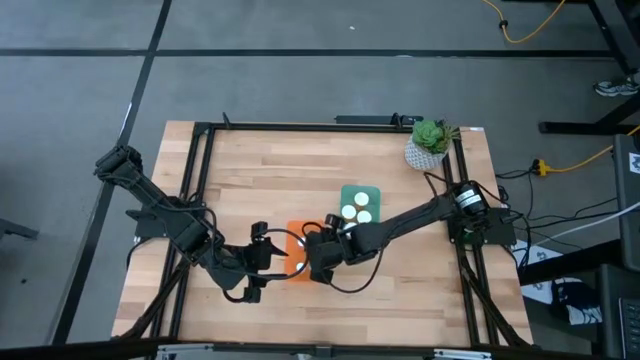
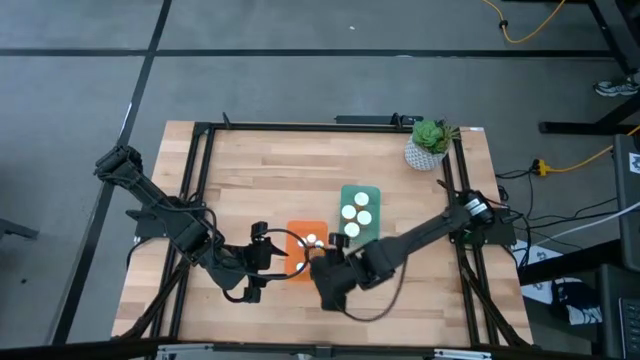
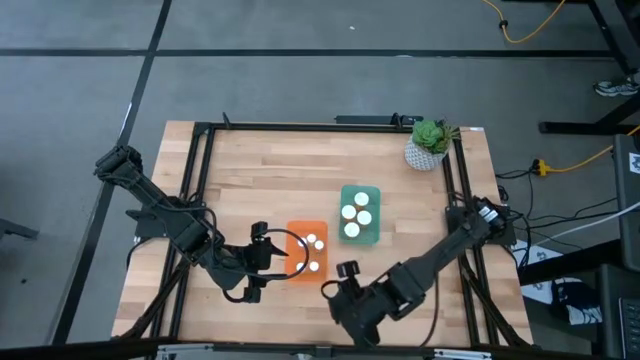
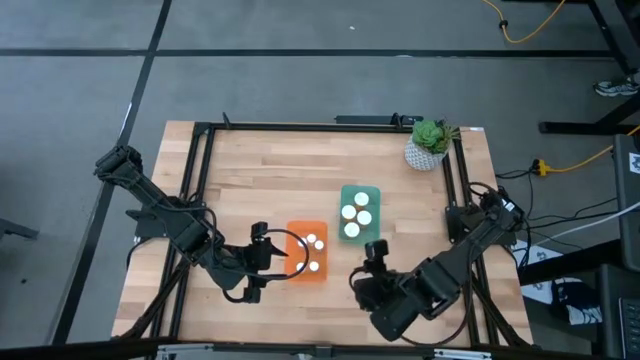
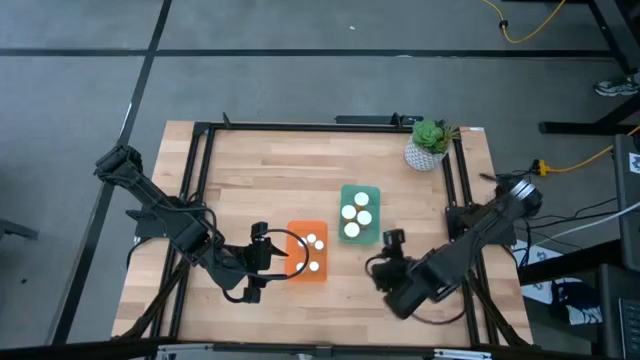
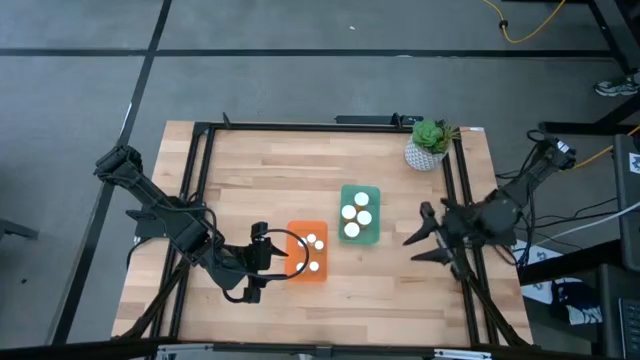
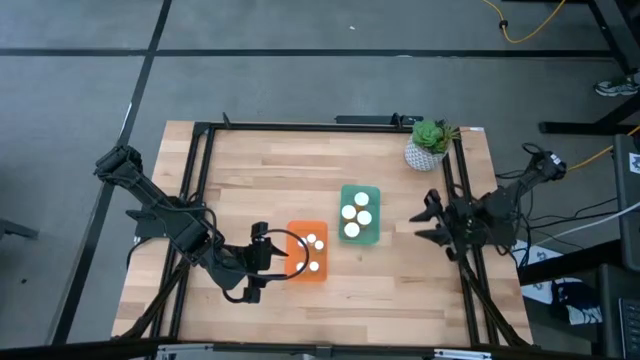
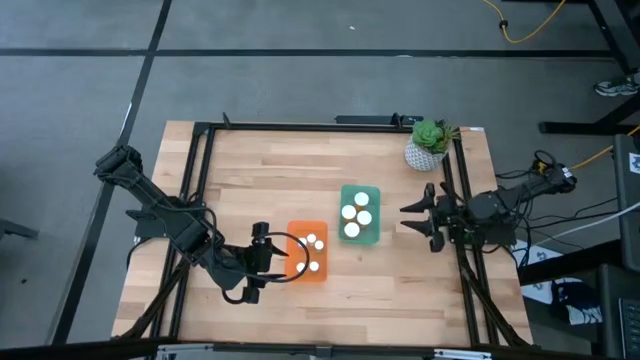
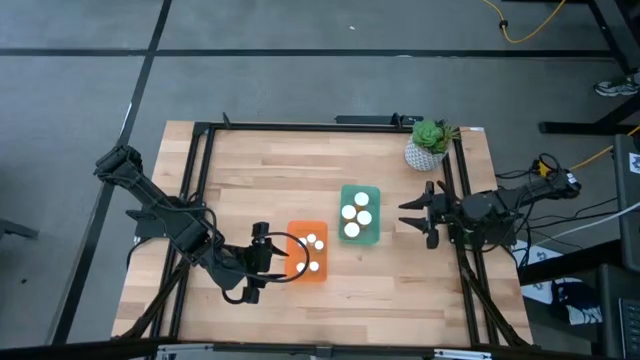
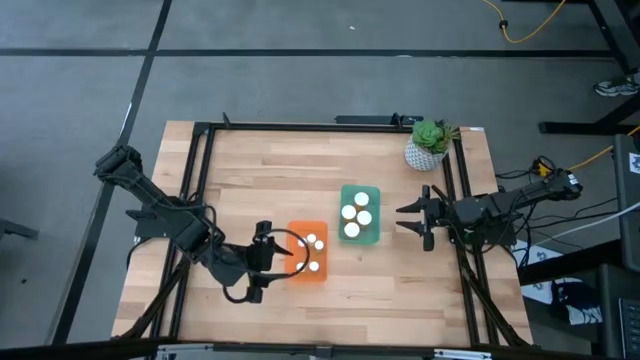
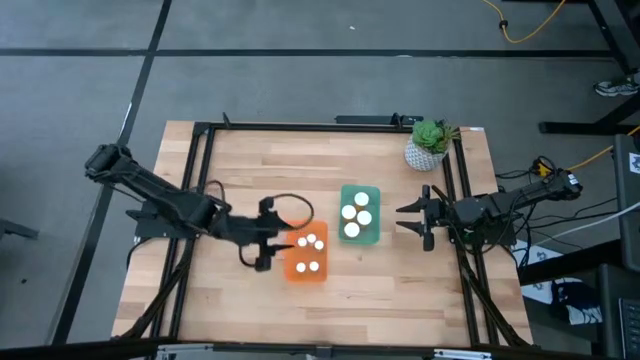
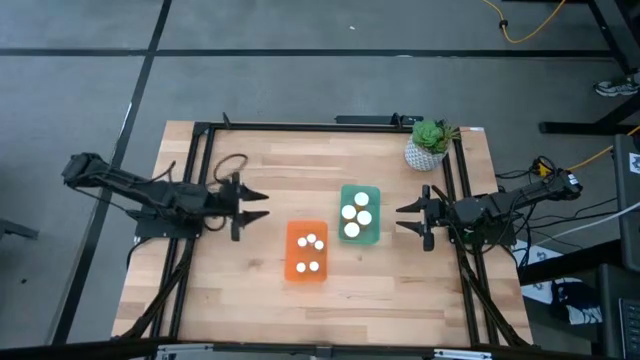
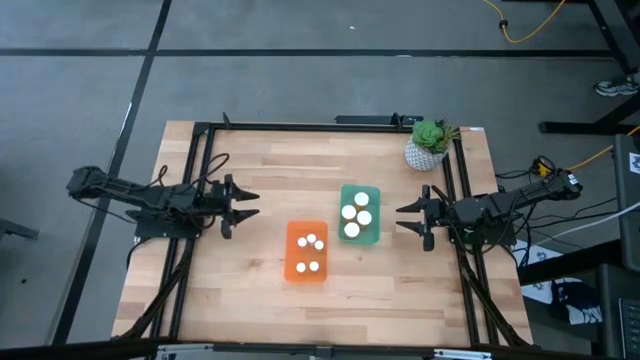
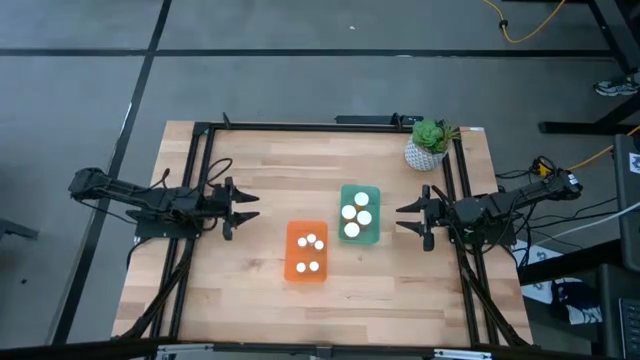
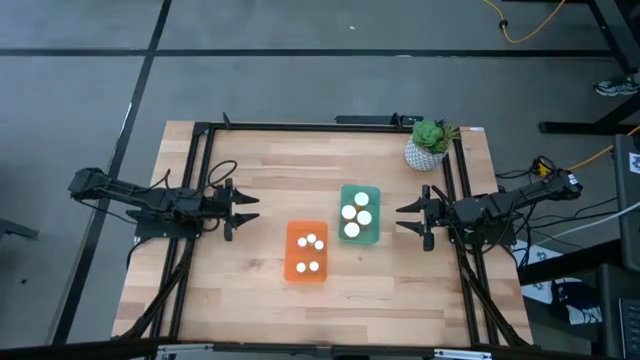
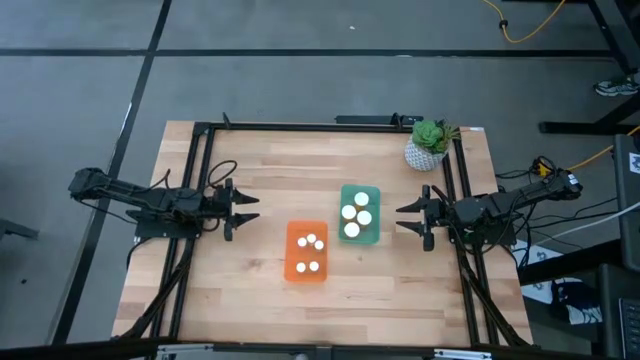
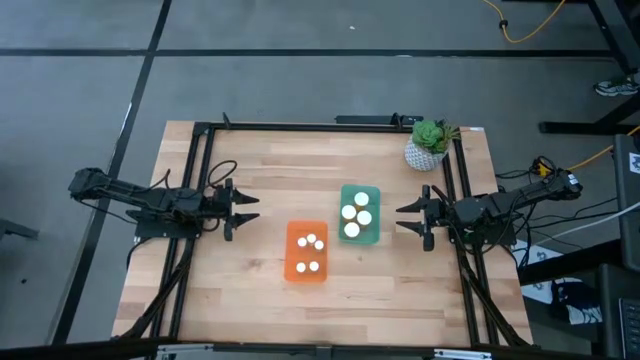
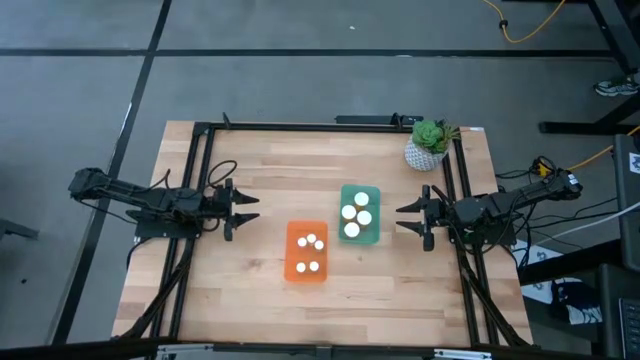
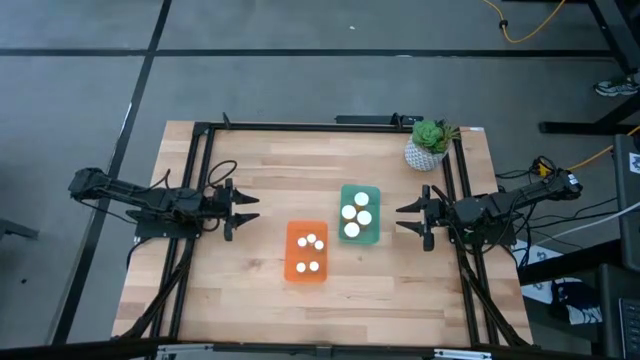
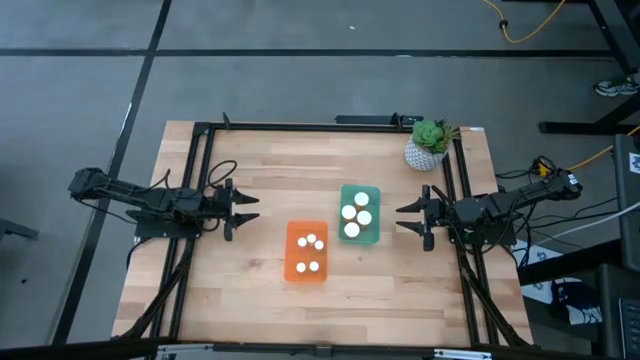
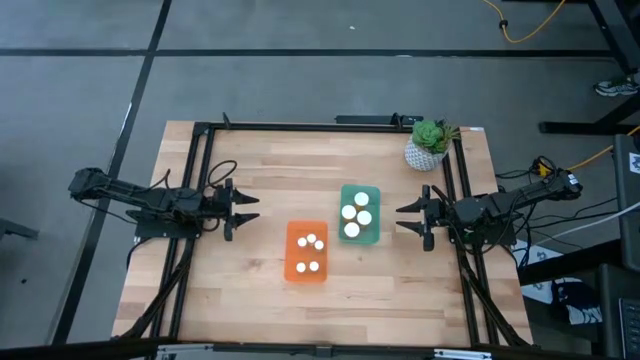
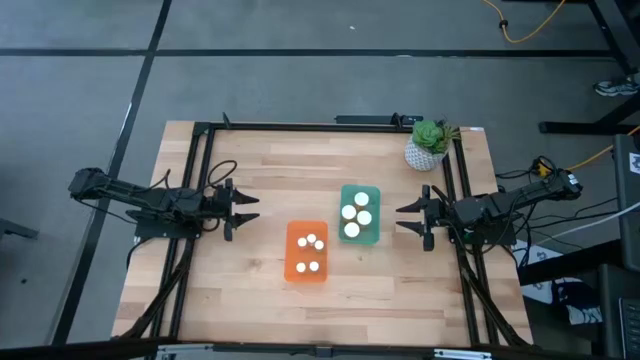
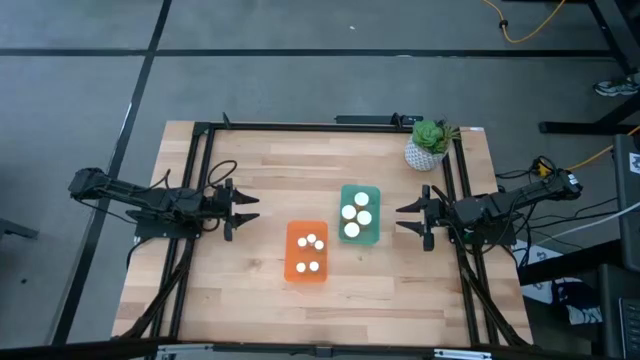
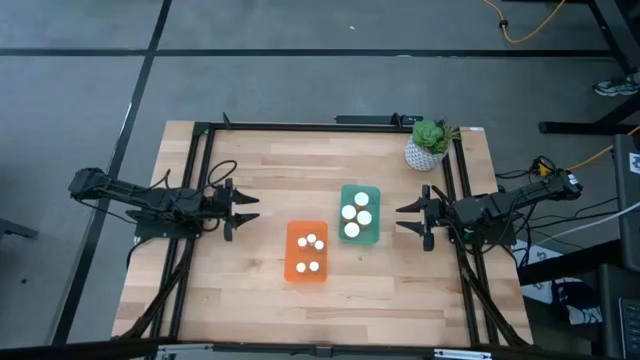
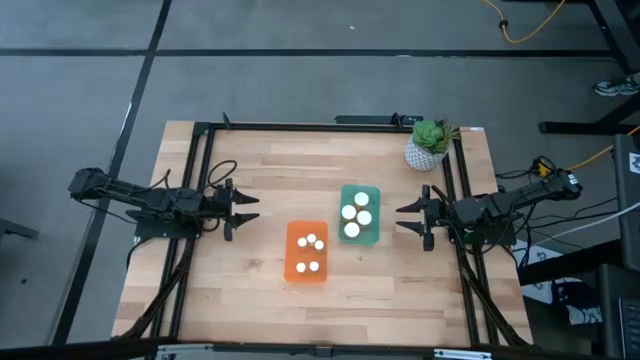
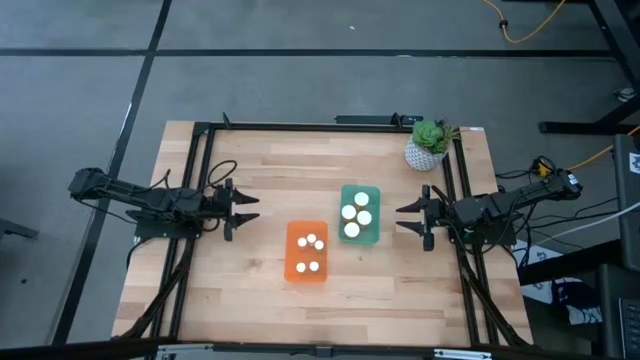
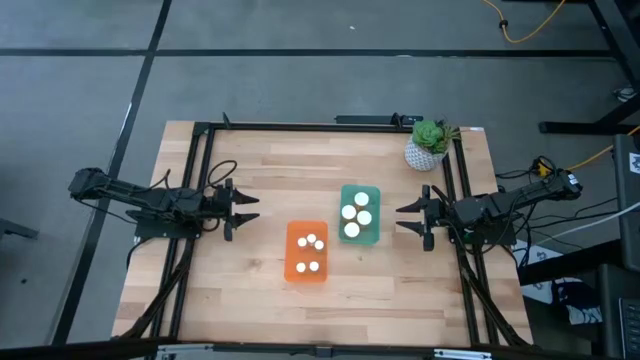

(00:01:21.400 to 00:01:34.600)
Task: Pick and place medicine bottles into bin by pill shape (circle, oval)
Return to Home Position

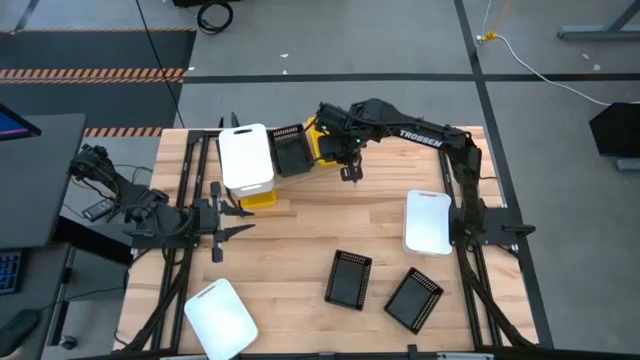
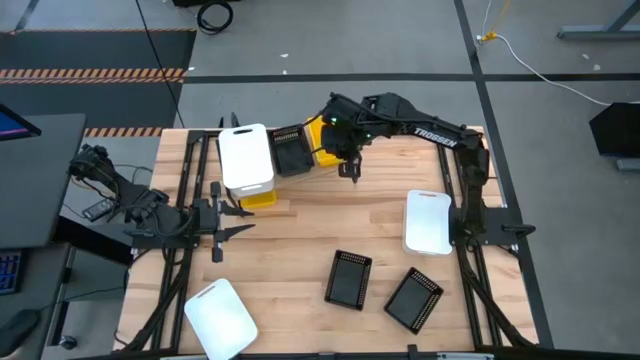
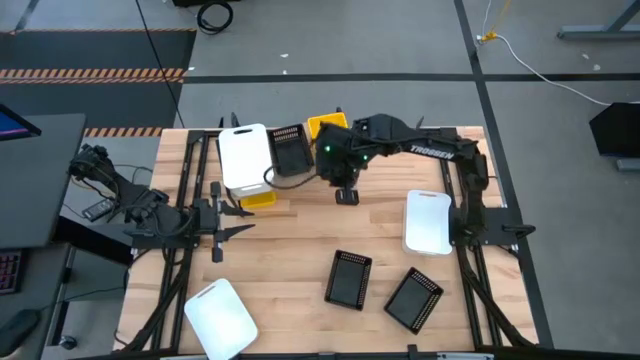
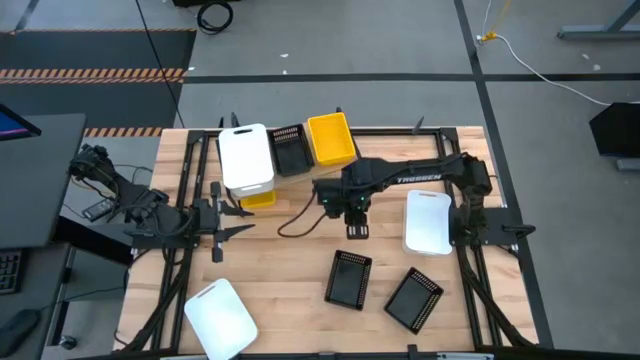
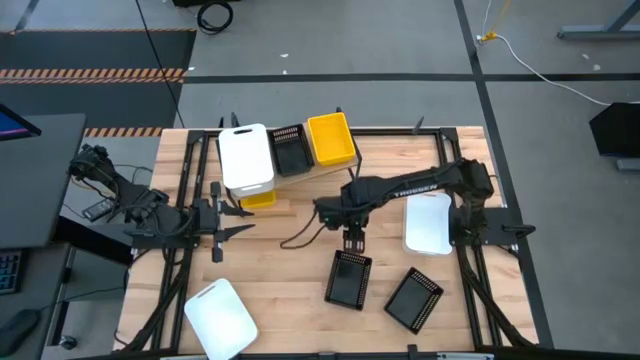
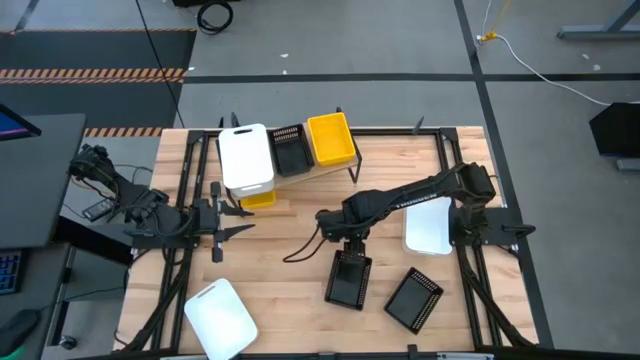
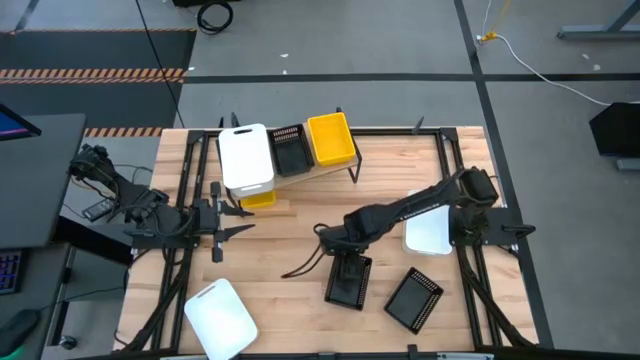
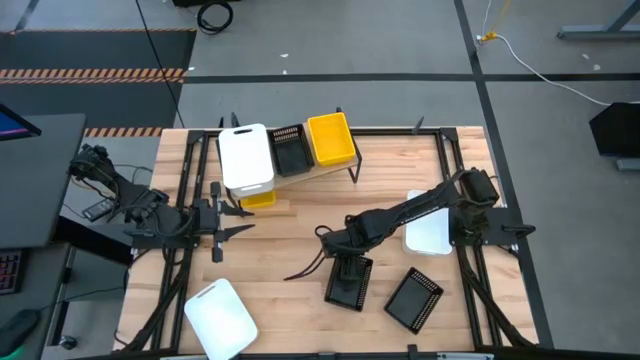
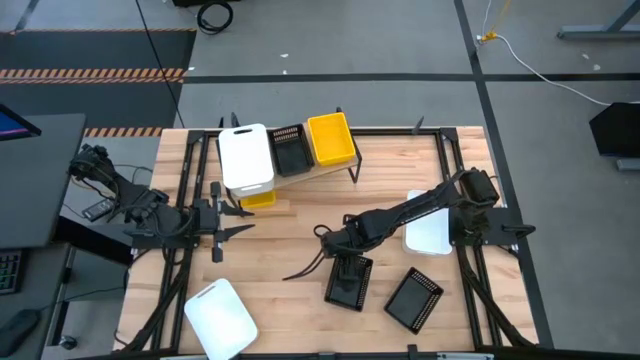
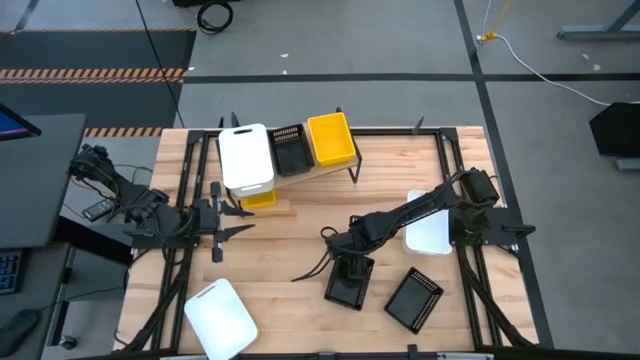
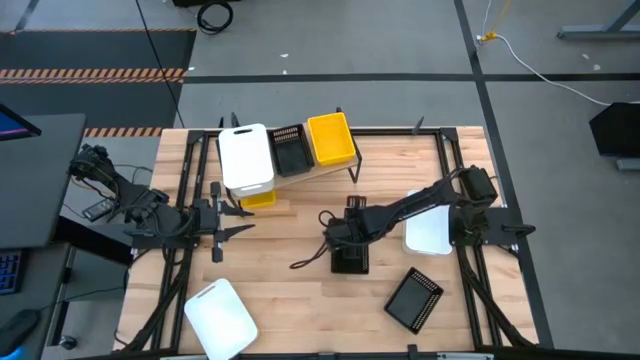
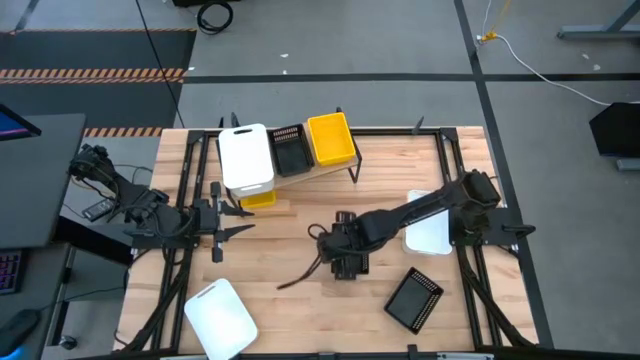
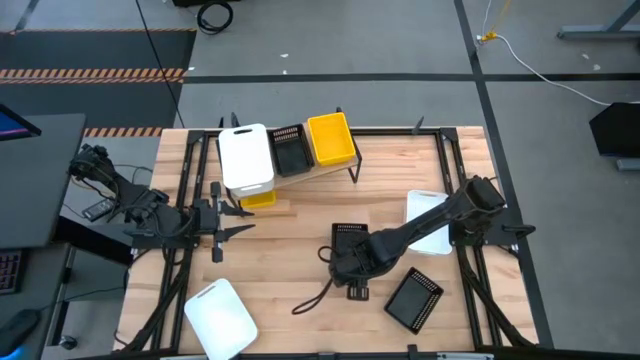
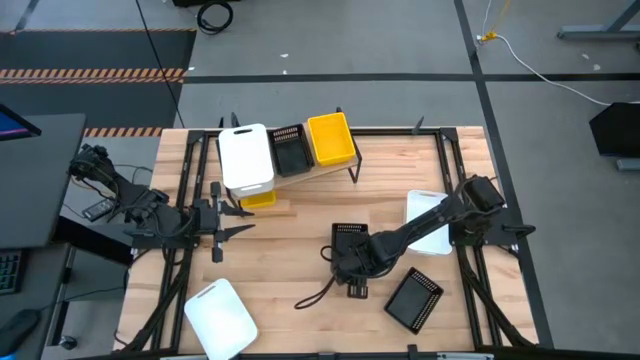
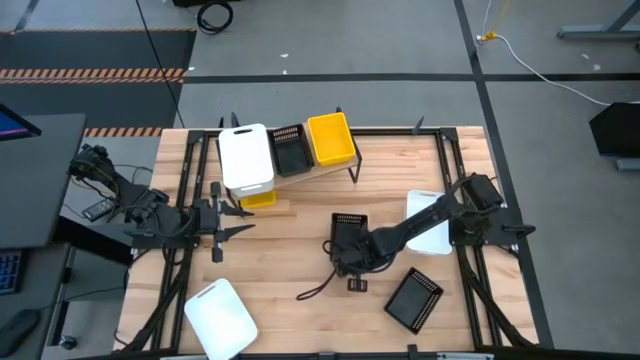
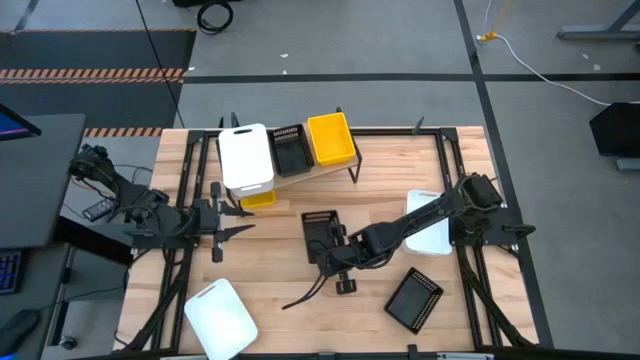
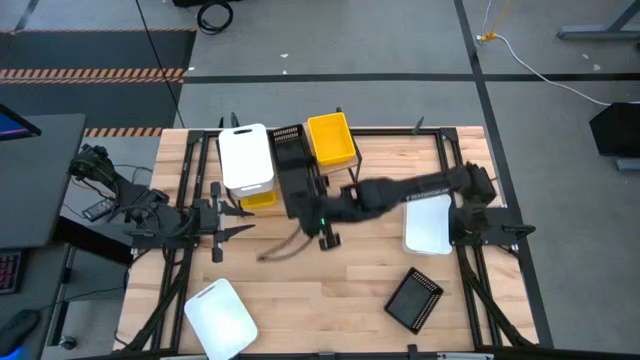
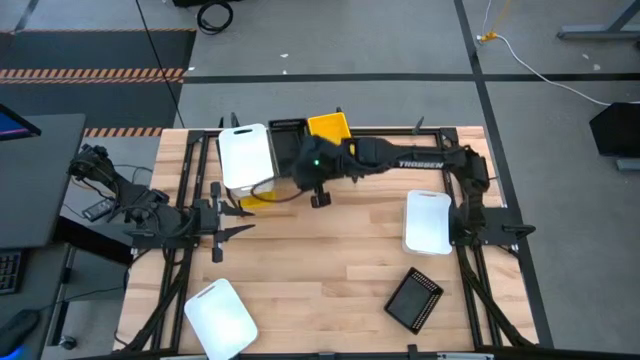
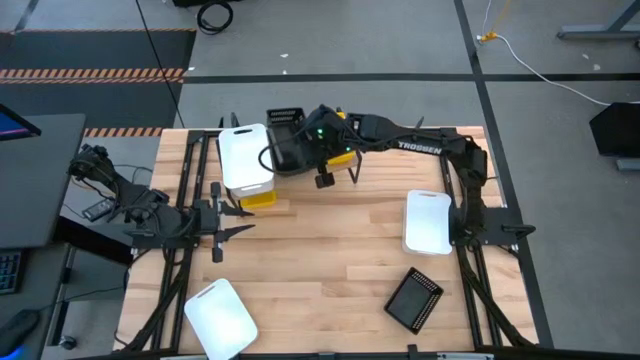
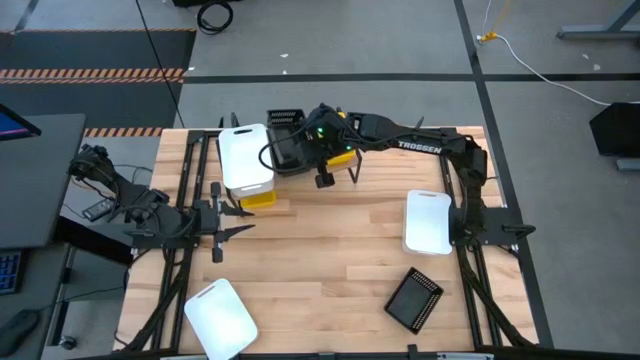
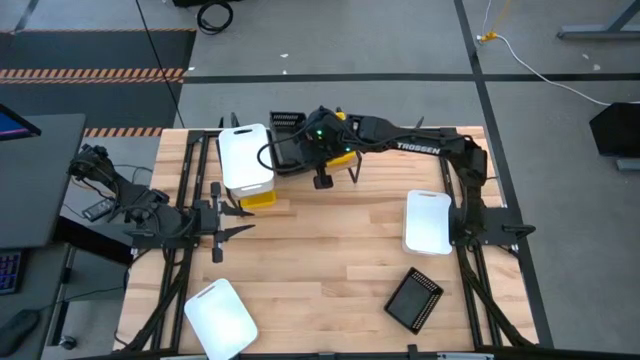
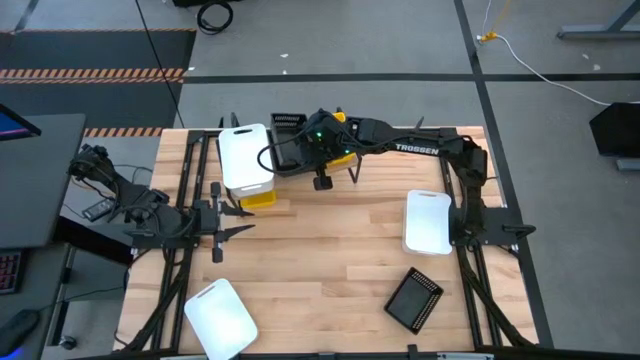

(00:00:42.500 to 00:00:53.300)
Task: Stack baskets on shelf by color
Stack the left black bin on top of the other black bin on the shelf
